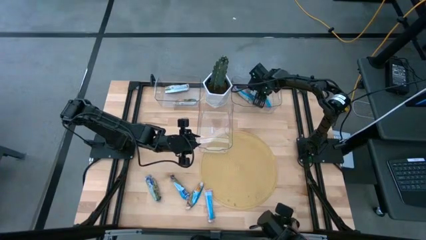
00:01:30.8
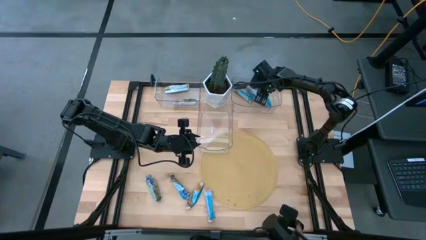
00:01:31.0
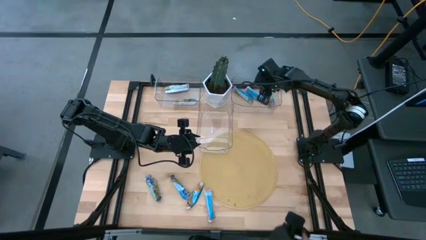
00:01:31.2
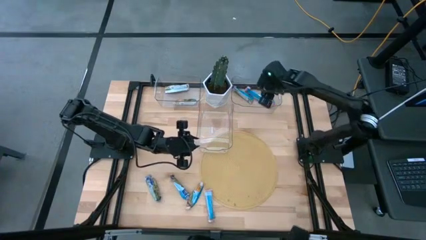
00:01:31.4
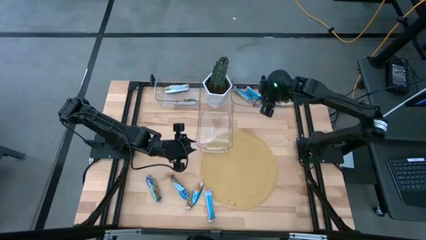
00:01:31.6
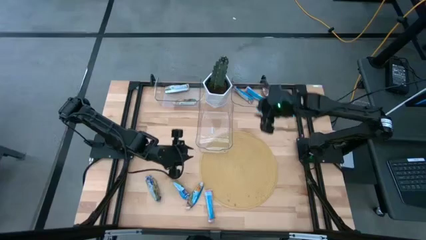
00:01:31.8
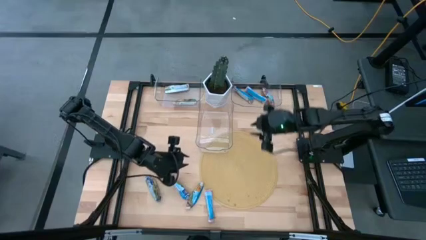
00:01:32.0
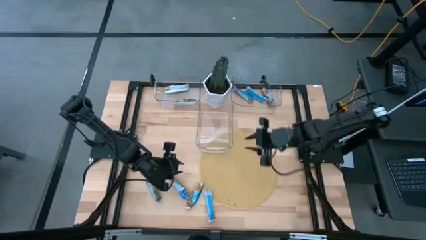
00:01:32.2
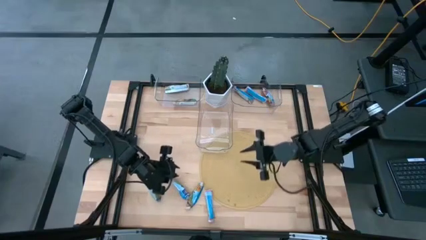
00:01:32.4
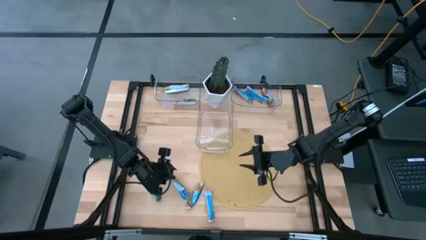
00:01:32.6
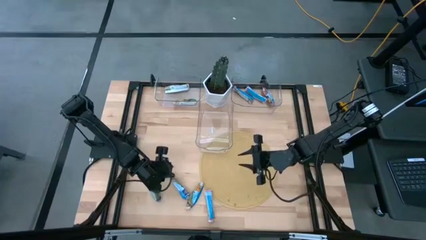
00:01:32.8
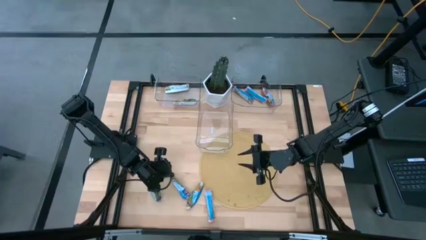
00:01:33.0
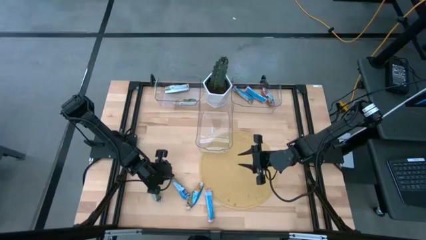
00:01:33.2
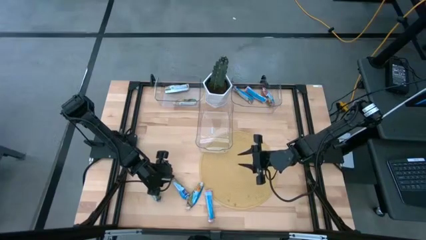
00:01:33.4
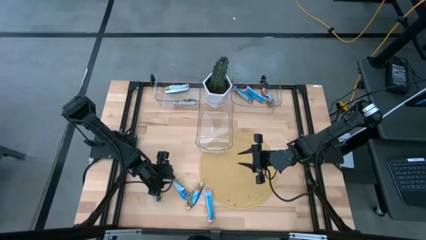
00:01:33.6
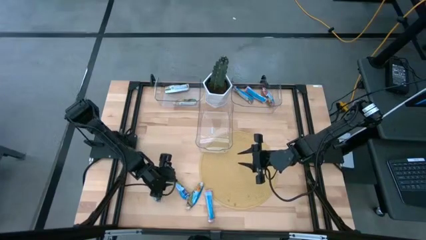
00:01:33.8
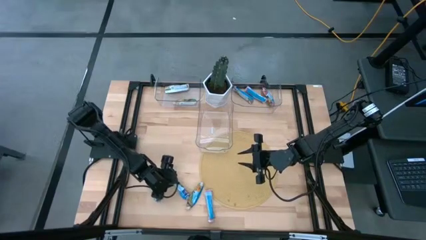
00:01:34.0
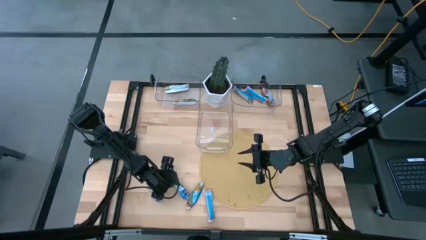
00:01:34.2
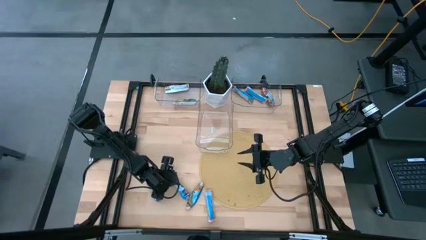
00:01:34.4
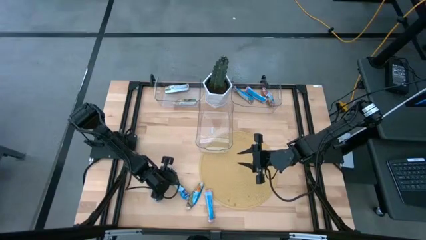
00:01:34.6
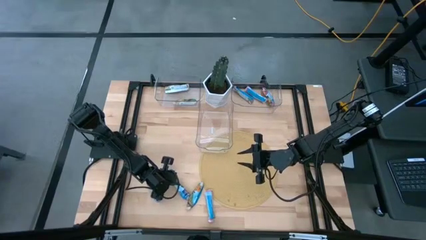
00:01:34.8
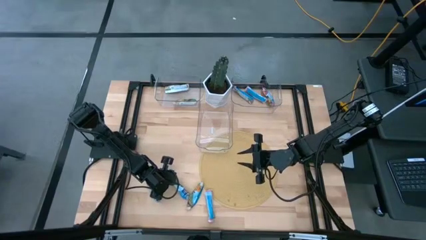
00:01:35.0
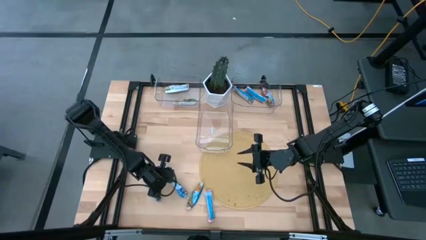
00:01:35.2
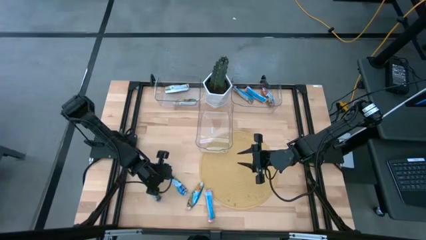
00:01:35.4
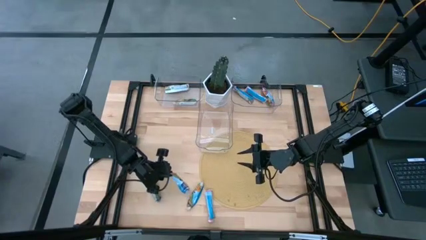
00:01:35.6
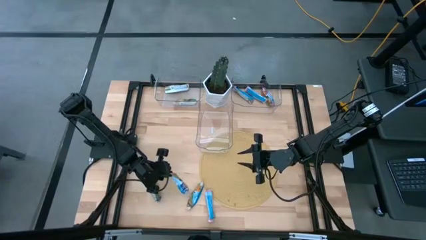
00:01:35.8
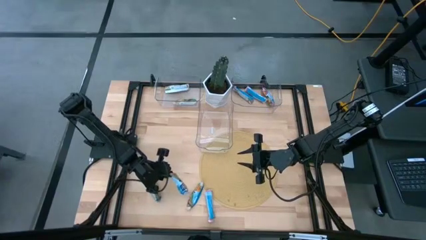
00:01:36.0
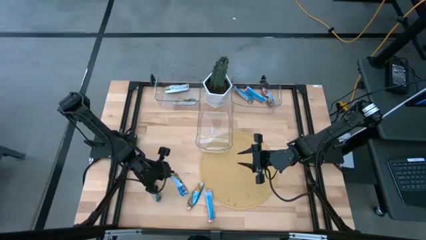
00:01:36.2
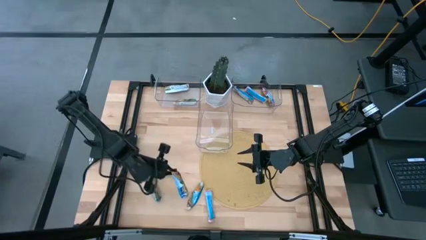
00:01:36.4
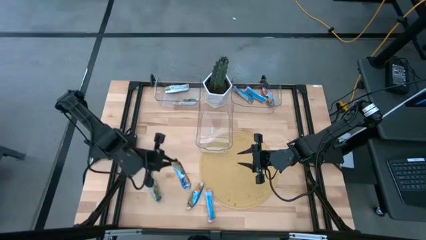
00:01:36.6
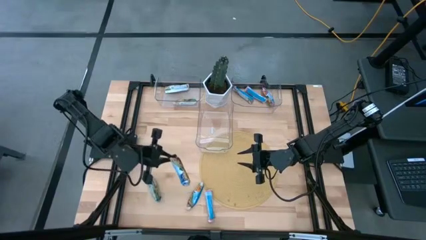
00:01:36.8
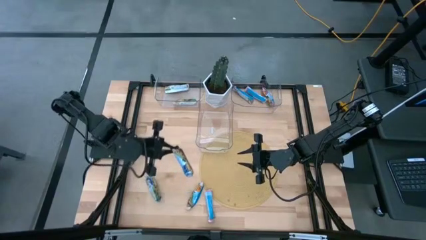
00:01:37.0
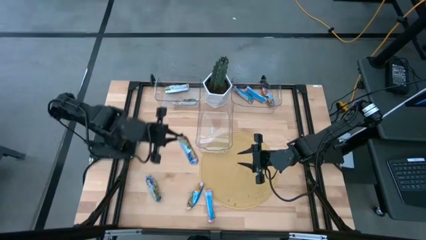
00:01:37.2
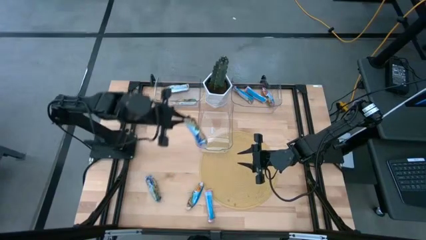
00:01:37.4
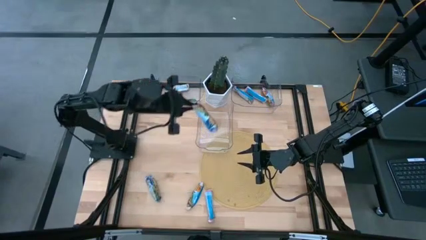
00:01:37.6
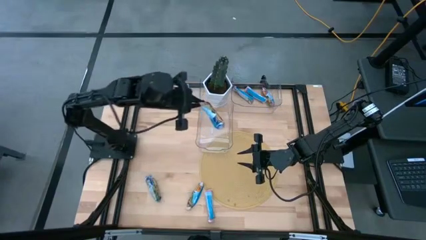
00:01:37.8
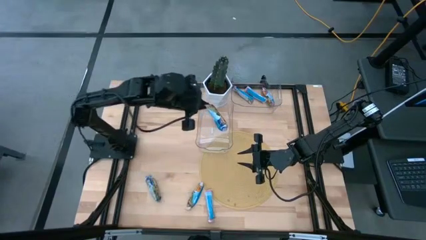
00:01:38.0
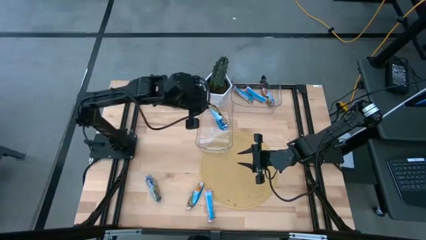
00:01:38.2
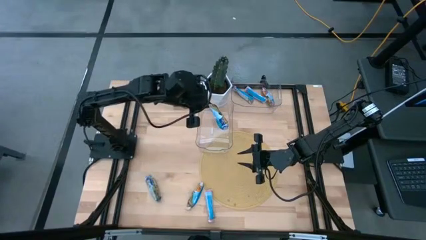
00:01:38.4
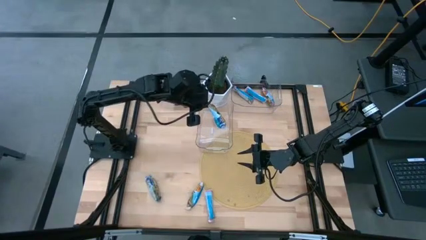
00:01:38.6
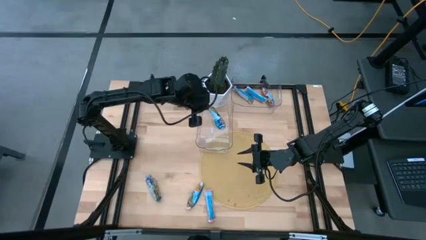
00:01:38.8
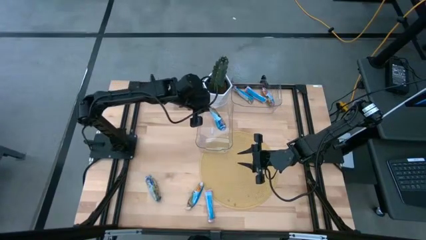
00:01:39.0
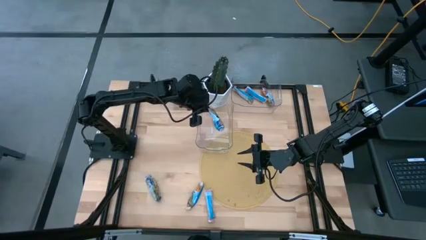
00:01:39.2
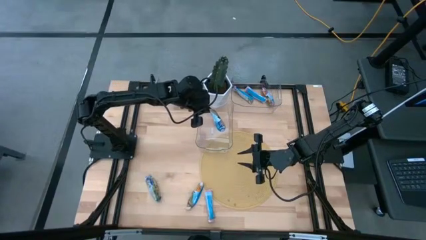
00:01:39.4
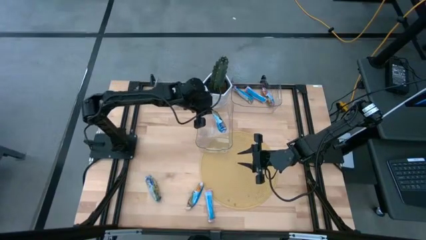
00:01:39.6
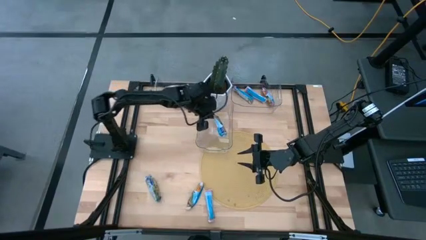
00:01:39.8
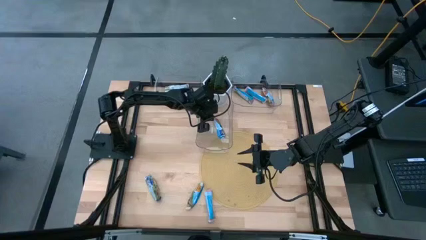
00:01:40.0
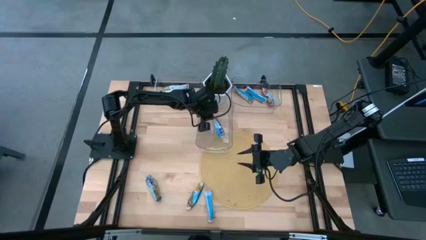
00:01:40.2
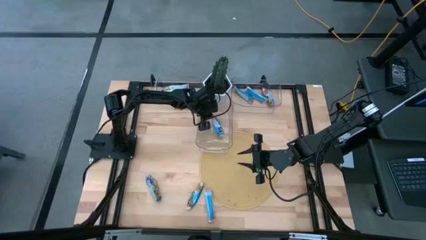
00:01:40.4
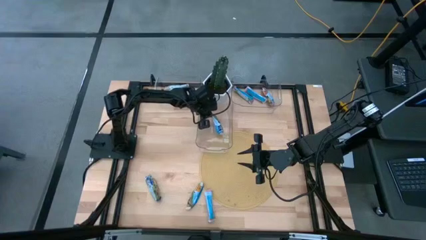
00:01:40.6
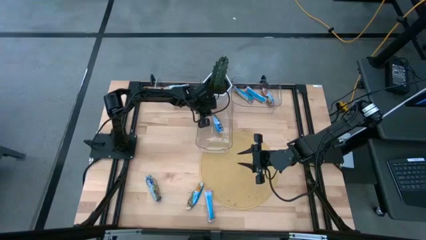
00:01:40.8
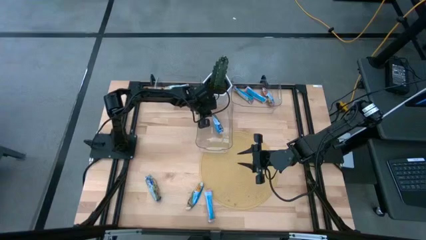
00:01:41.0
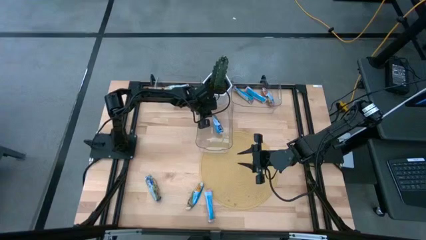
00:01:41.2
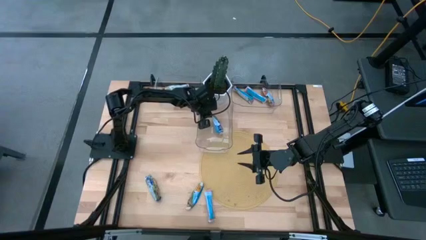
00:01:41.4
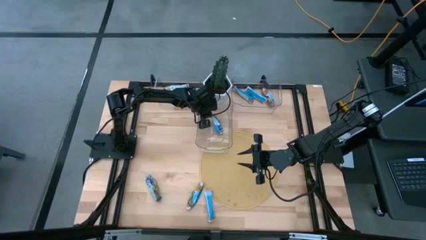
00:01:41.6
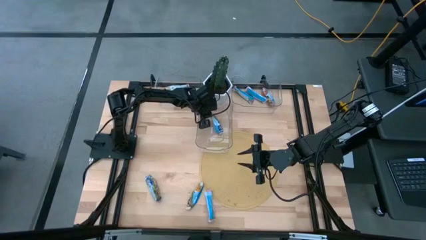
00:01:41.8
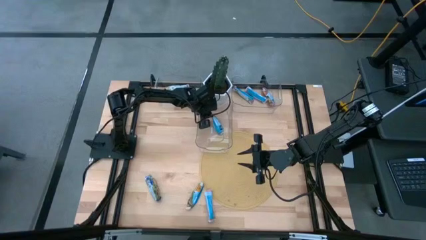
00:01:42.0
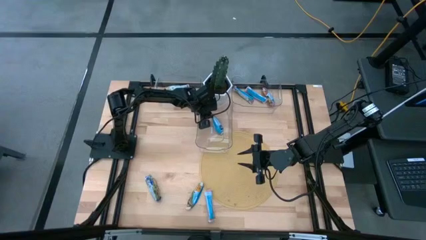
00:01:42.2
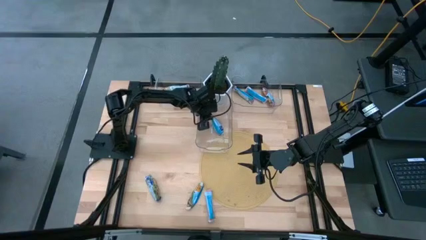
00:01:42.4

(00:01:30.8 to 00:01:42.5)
Task: Pick and place Granola Bars by type
Put the blue green granola bar into the middle transparent bin

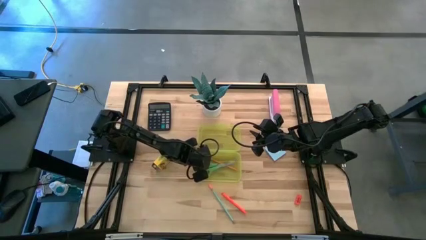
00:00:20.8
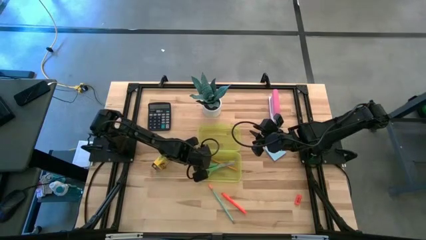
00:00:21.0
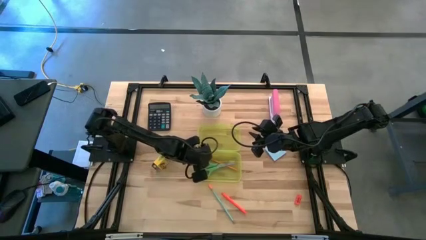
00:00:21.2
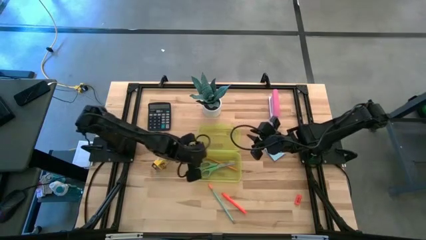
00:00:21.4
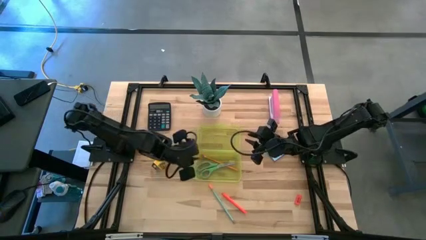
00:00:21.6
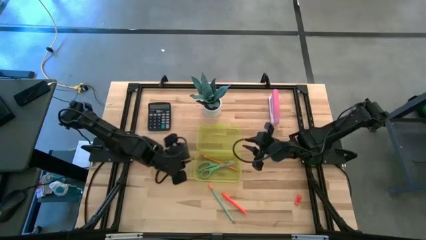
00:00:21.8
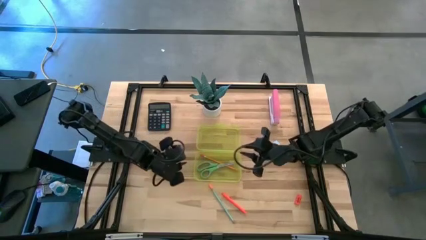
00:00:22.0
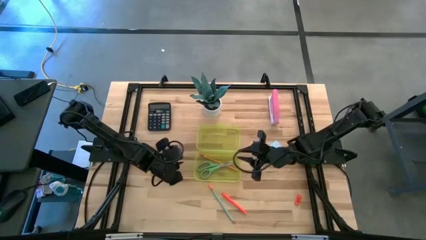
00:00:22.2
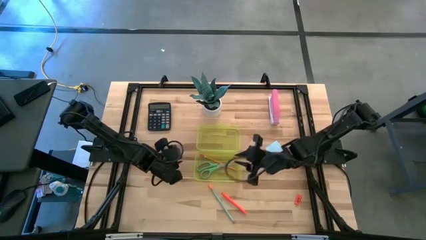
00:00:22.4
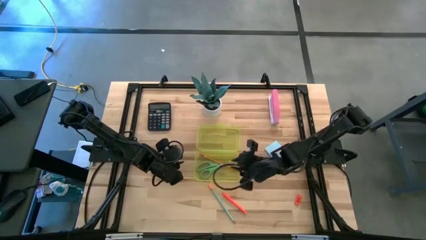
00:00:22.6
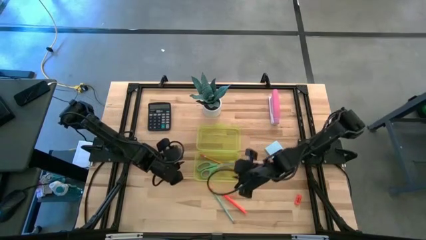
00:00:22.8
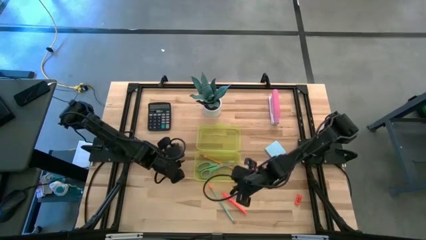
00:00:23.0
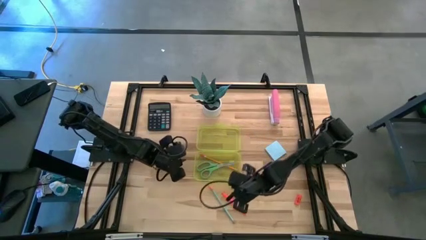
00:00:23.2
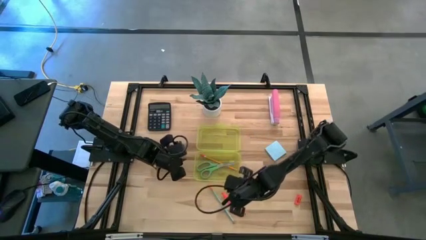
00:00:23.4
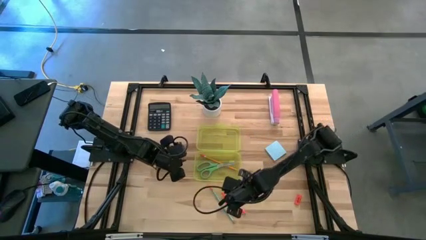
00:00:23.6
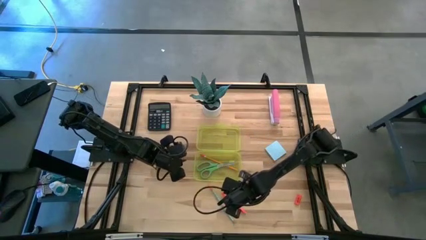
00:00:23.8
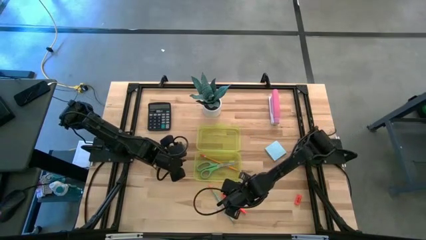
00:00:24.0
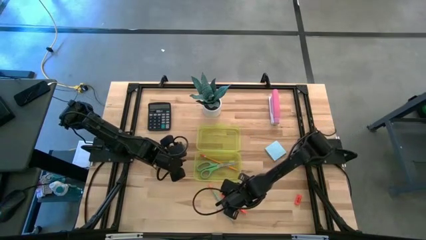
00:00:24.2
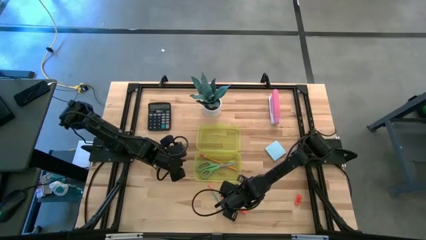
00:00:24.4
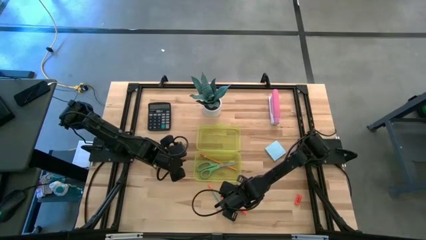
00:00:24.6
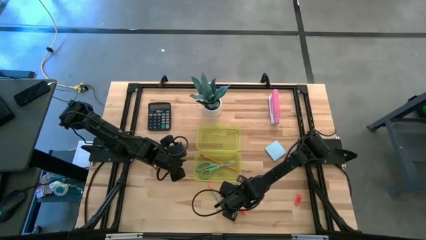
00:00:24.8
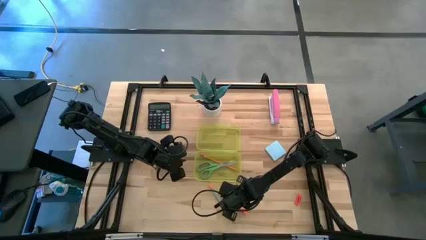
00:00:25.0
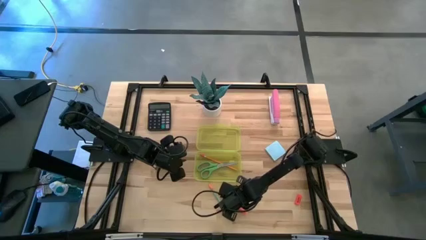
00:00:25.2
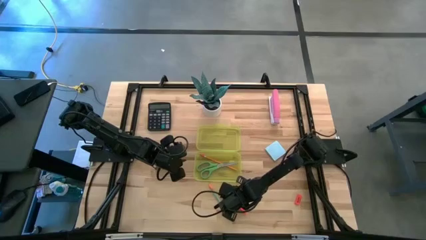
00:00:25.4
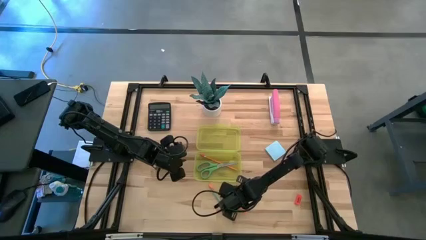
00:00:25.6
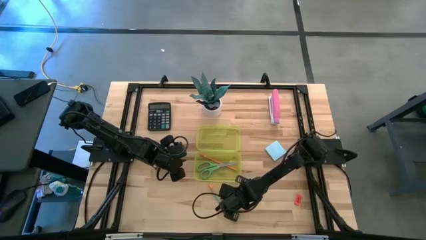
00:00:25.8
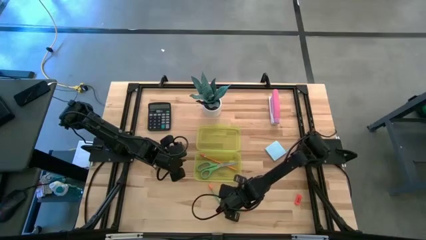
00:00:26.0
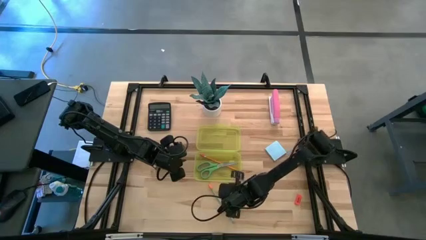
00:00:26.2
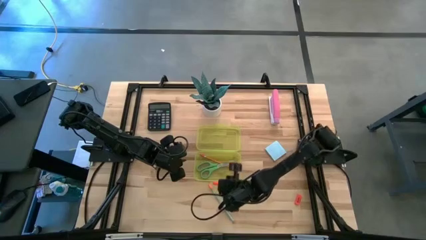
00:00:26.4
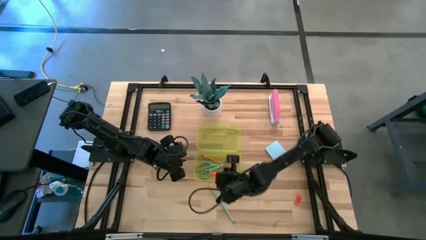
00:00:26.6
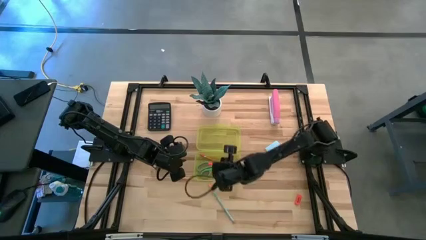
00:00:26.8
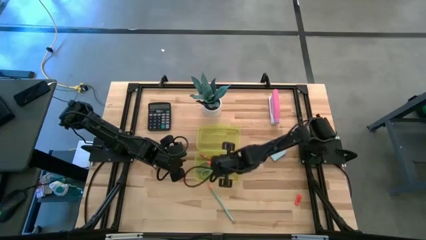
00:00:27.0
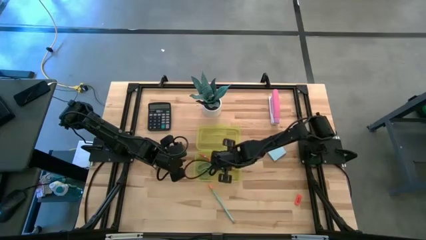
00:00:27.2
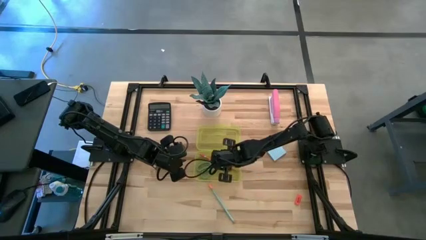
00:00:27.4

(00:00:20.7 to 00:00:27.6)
Task: Pack school essentials
Put the pen into the yellow box
